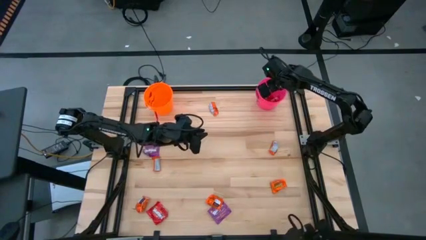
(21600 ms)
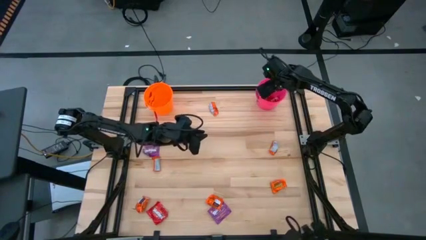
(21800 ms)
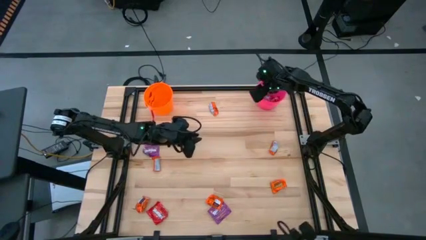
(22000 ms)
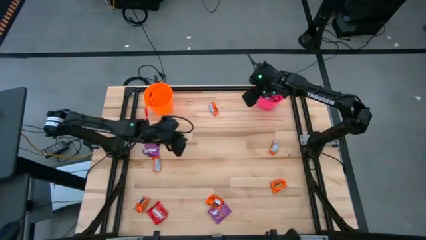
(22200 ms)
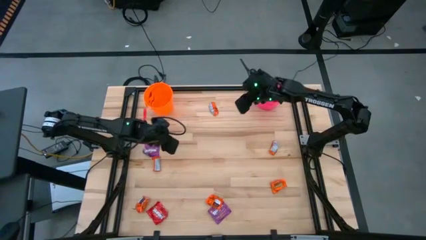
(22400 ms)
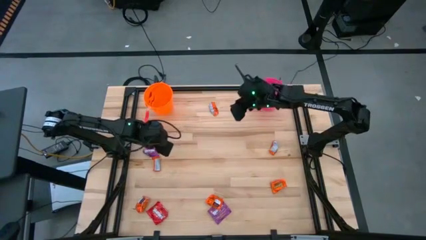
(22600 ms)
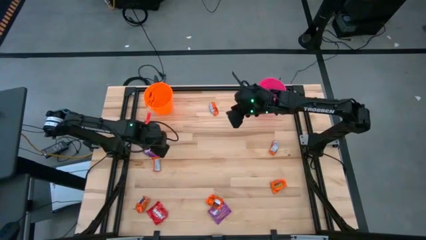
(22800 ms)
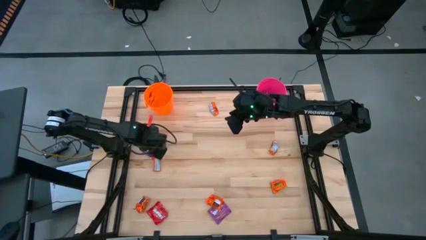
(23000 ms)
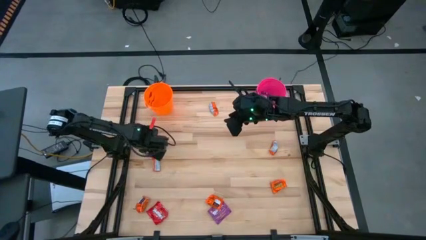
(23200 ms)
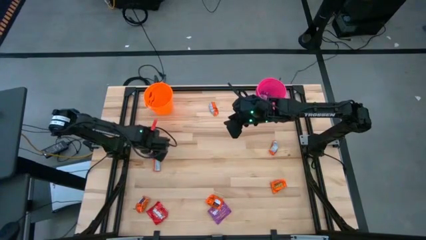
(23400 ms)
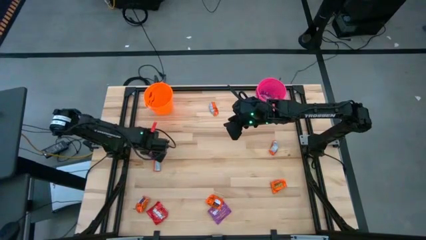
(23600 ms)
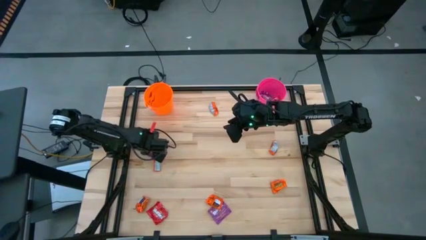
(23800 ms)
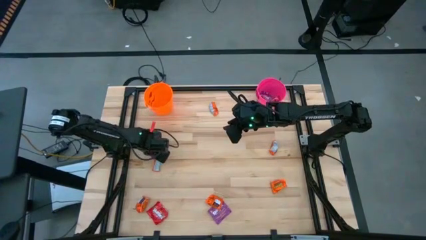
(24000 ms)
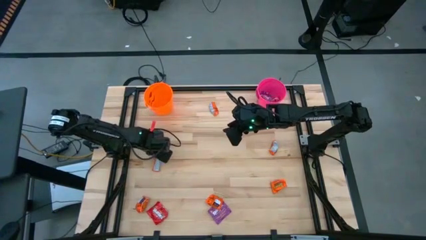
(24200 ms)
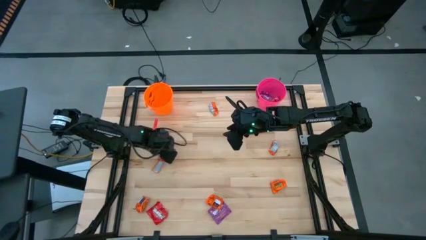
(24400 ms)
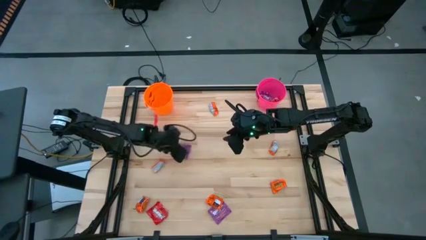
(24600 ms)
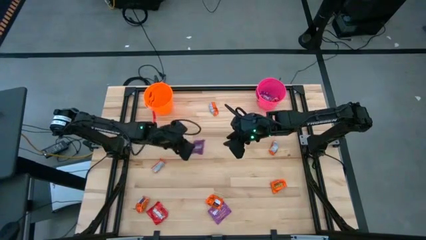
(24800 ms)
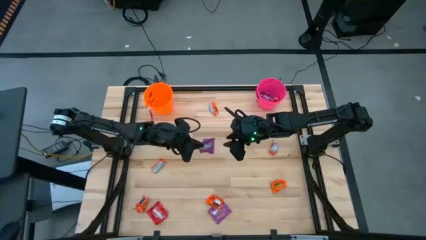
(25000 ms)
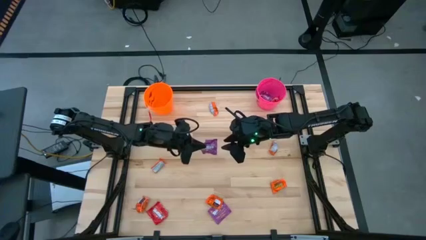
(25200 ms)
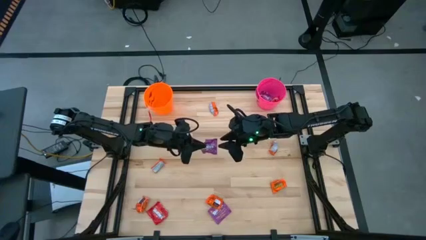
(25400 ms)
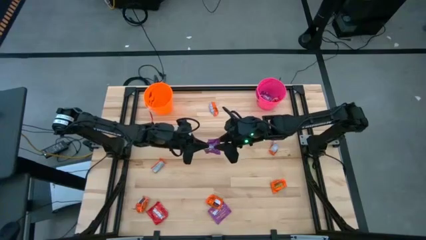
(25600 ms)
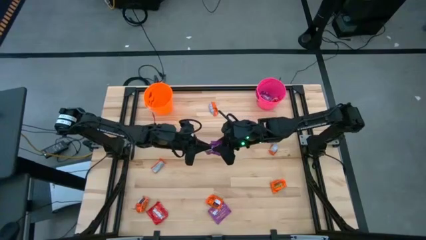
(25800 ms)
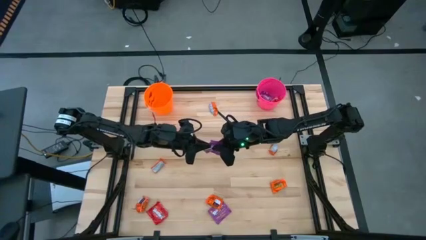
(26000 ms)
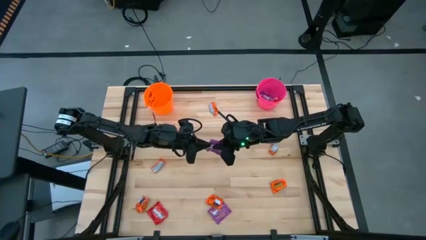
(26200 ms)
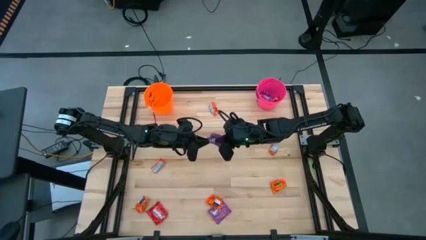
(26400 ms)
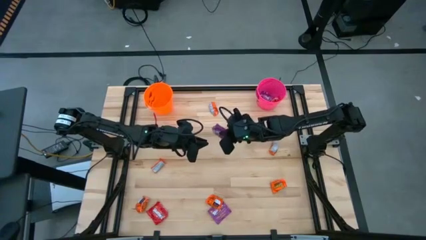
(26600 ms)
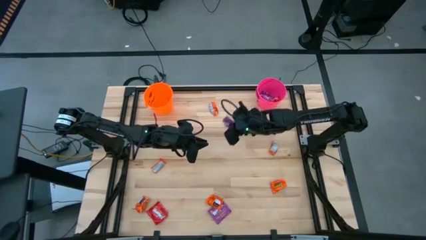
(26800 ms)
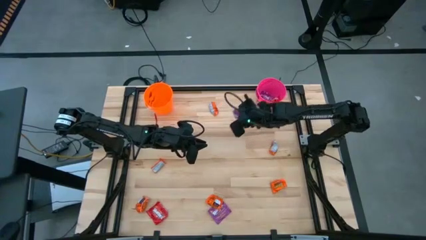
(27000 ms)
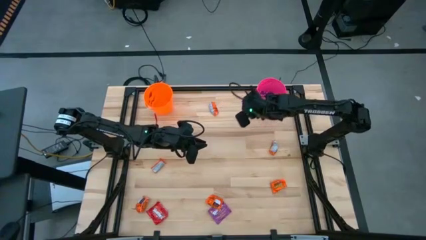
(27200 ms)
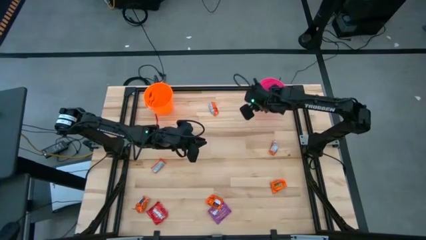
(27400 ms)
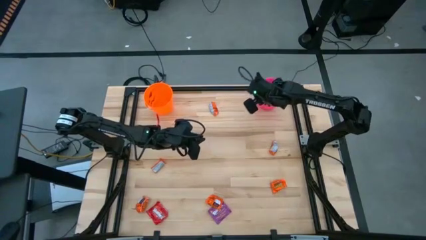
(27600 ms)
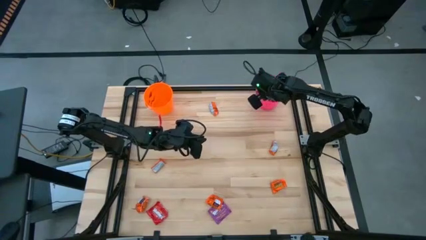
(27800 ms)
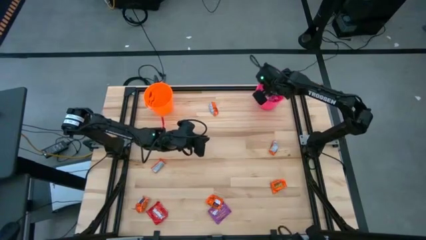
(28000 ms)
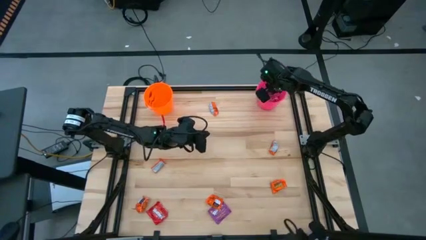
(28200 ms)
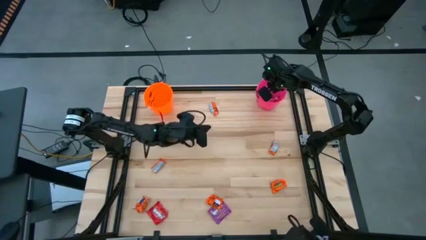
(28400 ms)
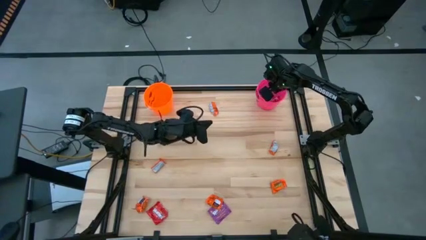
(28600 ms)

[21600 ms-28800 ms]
Task: Sort candy by brand, put in halloween buckets
Put the purple candy into the pink bucket

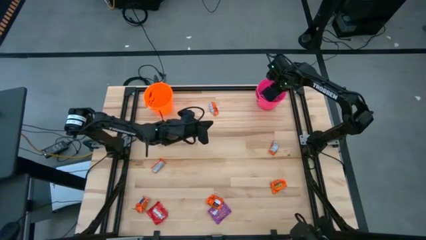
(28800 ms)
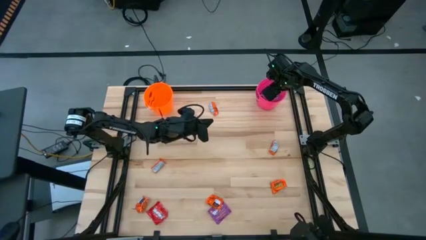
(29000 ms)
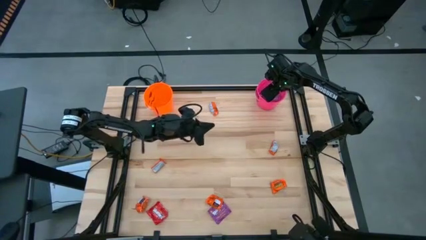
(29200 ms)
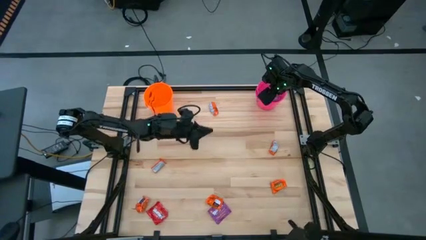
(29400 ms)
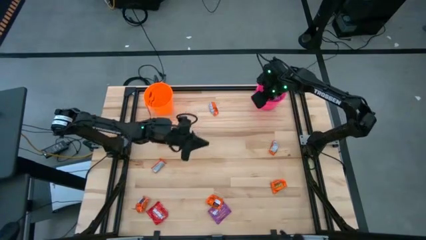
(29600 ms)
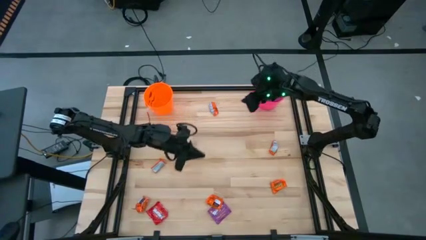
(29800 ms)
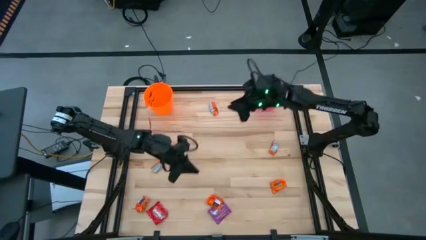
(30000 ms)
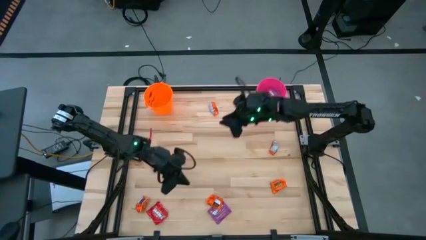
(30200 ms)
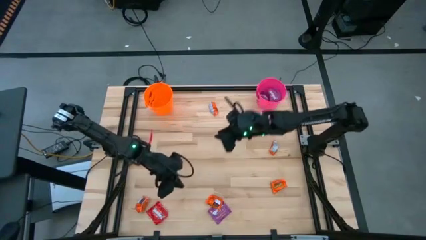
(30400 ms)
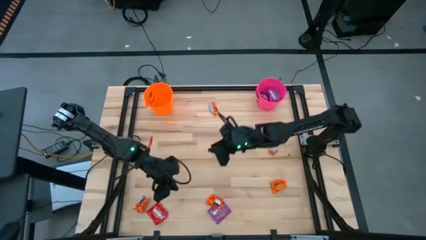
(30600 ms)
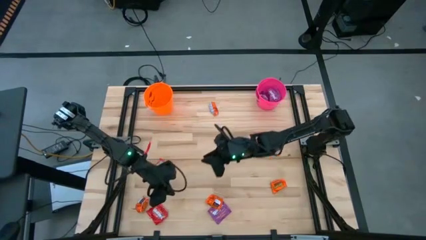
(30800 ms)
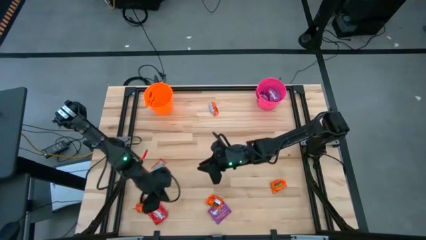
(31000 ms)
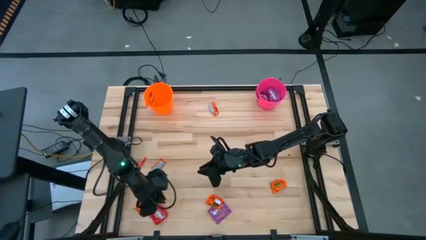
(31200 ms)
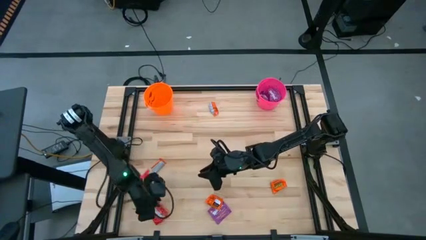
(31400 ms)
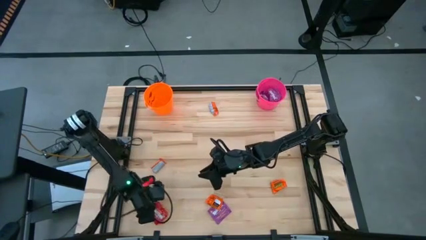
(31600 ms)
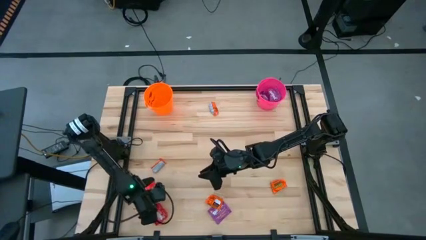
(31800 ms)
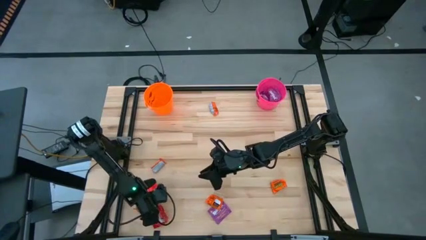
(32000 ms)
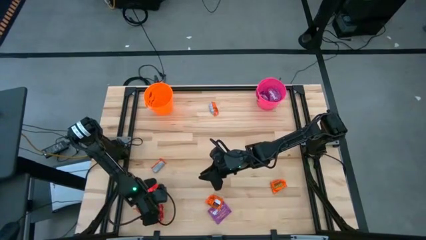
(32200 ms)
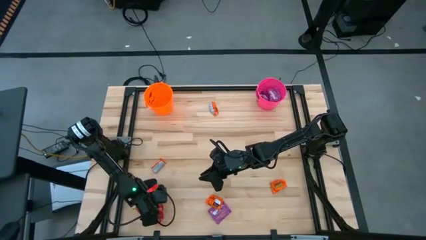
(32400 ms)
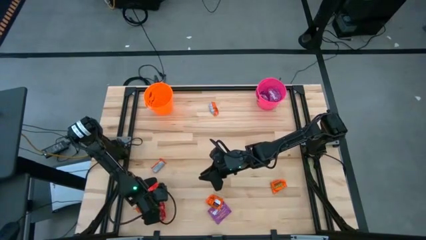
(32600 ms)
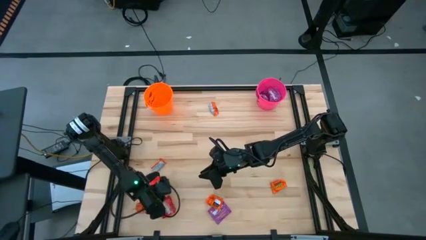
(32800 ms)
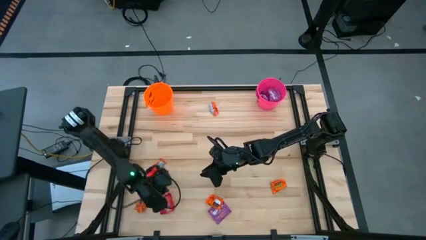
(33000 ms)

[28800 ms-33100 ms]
Put the red candy into the pink bucket

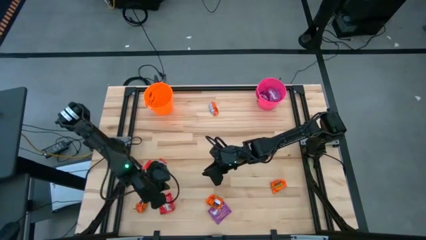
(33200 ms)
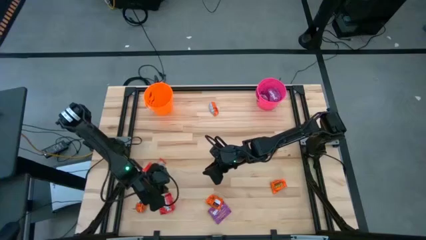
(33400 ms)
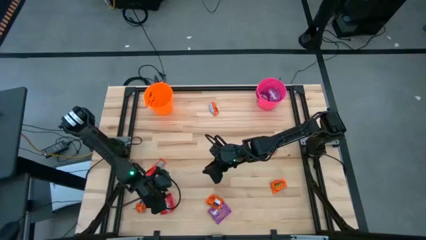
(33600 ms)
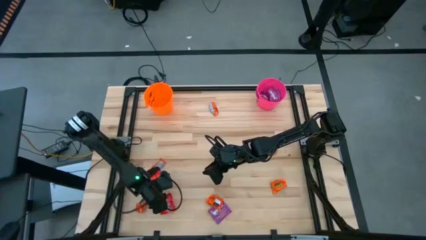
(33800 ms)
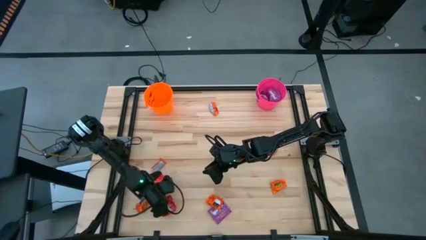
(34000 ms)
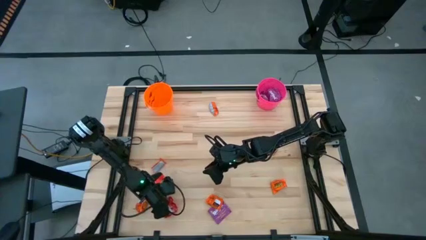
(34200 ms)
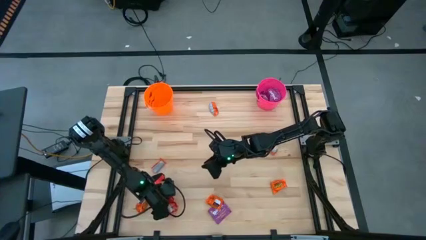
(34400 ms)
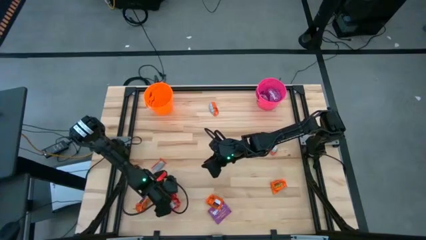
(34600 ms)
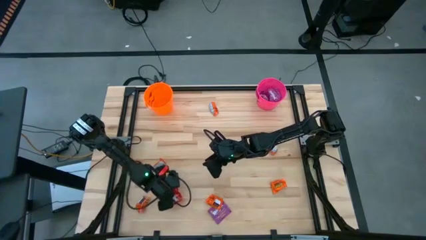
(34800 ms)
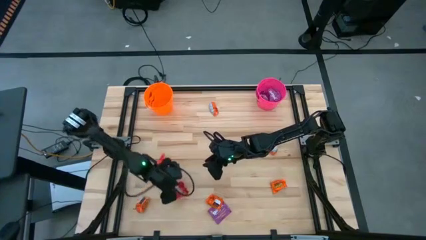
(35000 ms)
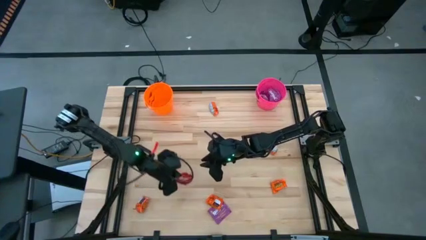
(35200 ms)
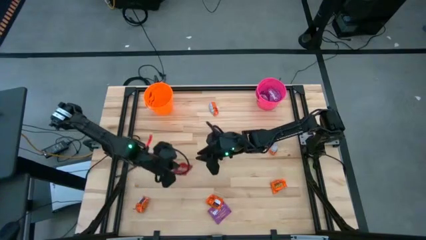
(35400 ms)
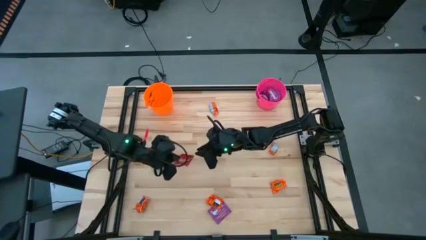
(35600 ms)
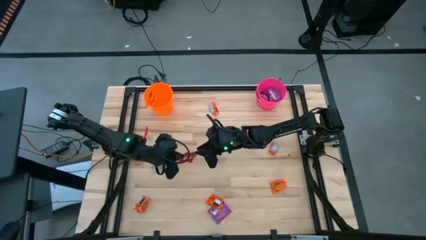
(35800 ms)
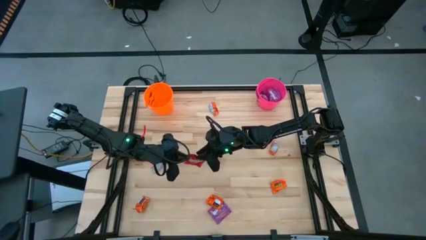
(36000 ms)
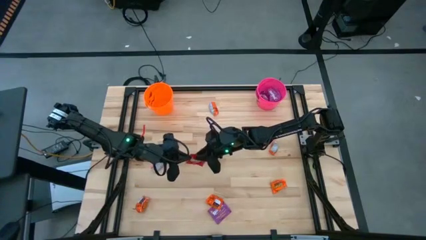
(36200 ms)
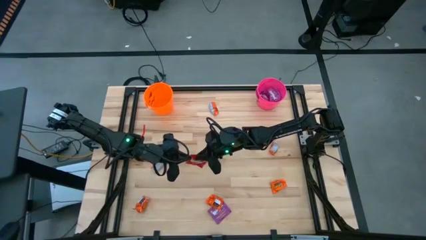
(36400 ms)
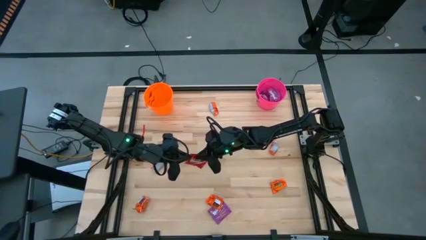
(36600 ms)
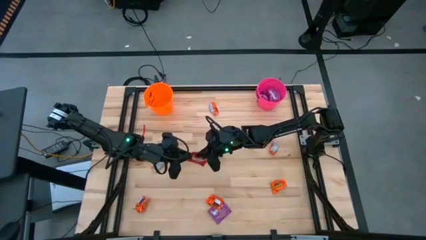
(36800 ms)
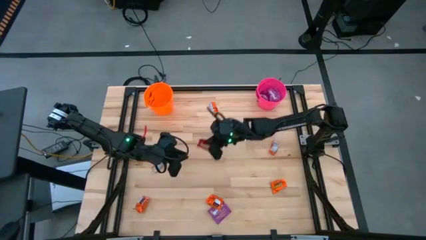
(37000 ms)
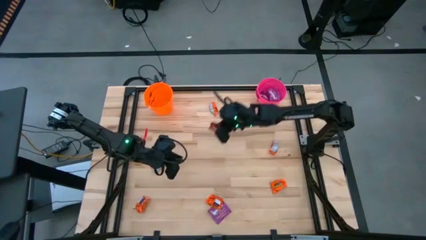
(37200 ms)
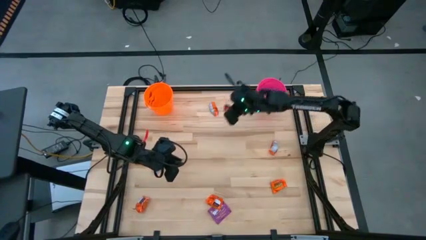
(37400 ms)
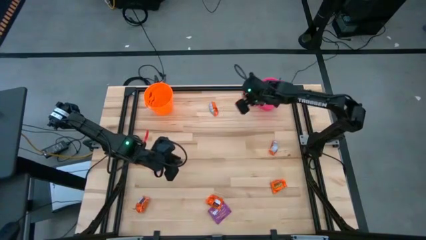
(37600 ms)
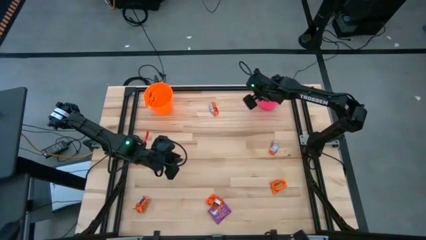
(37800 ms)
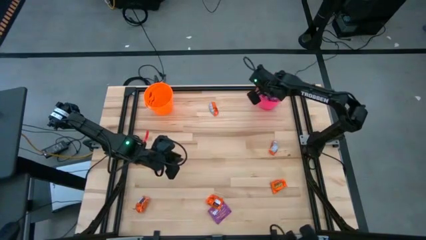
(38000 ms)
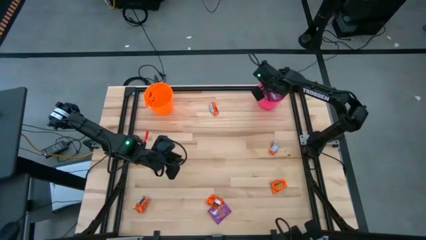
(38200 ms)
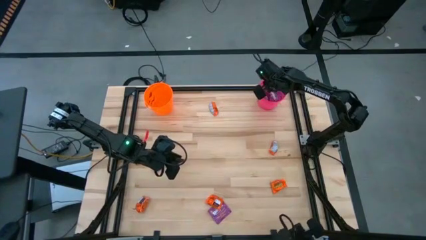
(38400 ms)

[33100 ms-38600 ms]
Put the red candy into the pink bucket
